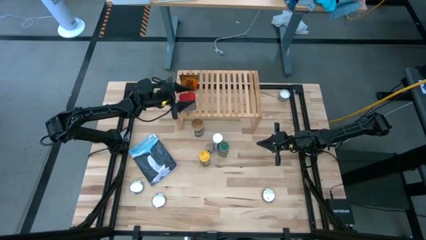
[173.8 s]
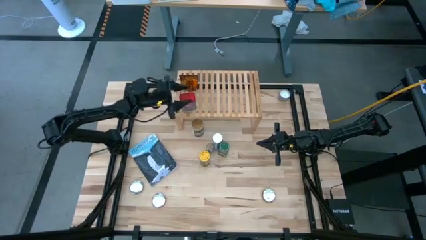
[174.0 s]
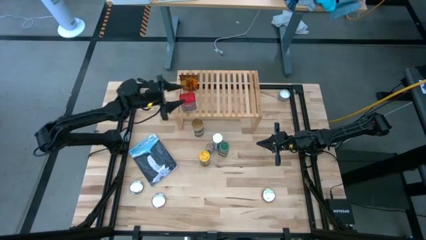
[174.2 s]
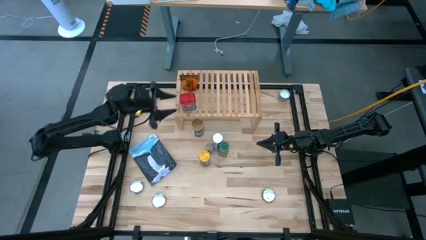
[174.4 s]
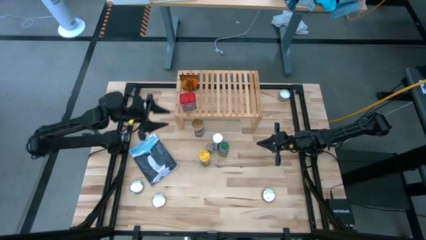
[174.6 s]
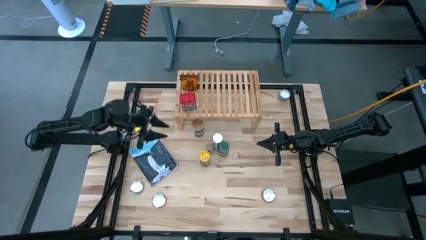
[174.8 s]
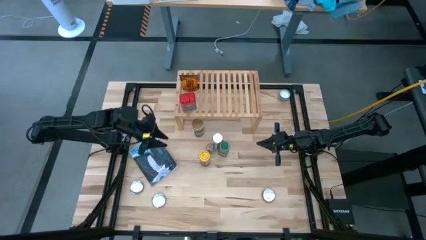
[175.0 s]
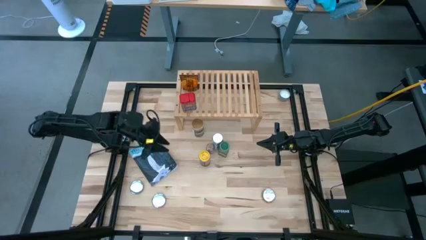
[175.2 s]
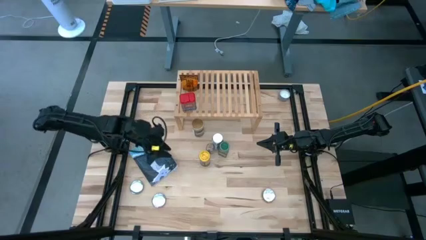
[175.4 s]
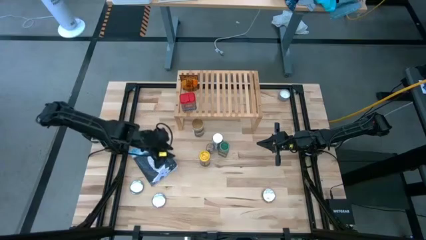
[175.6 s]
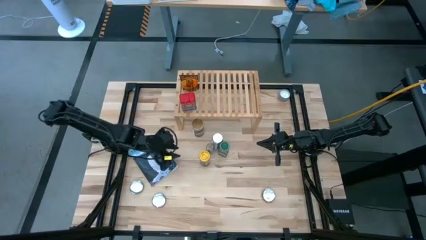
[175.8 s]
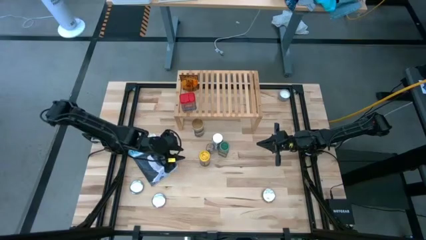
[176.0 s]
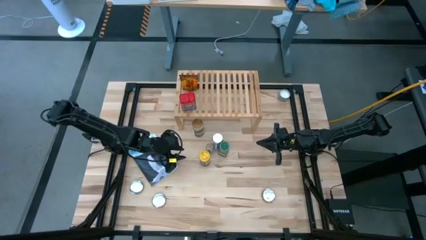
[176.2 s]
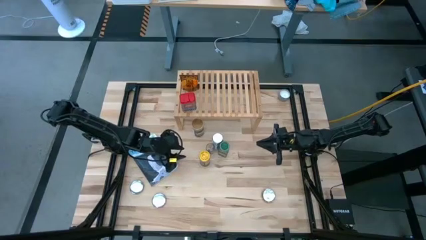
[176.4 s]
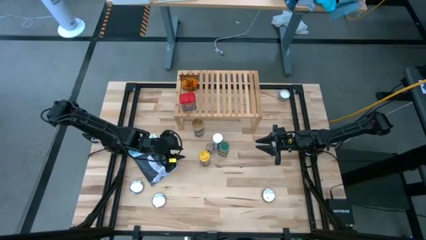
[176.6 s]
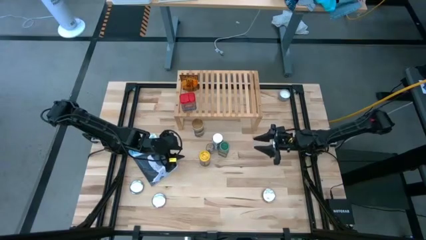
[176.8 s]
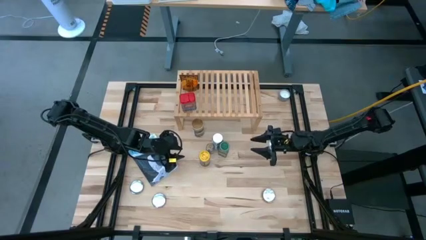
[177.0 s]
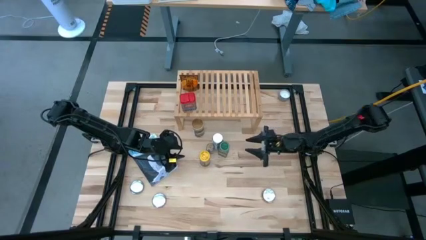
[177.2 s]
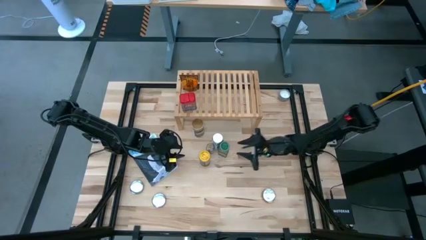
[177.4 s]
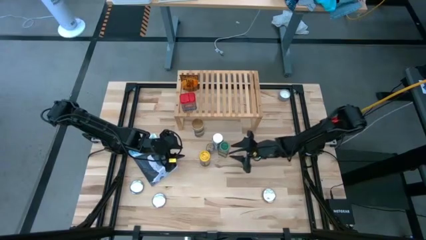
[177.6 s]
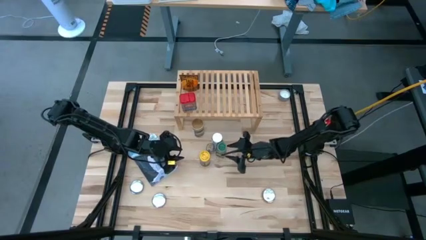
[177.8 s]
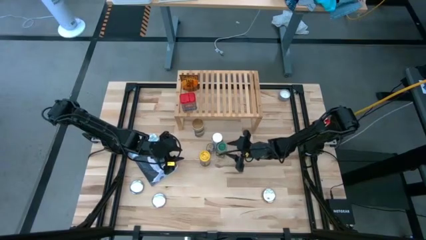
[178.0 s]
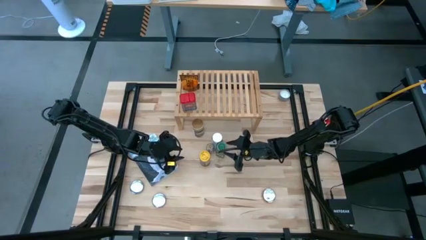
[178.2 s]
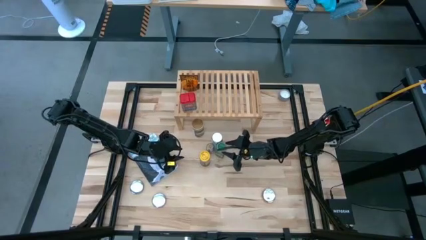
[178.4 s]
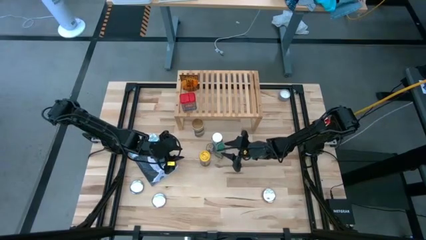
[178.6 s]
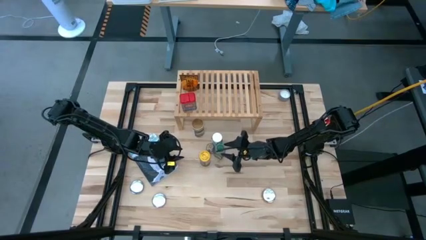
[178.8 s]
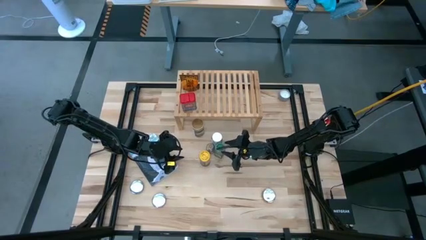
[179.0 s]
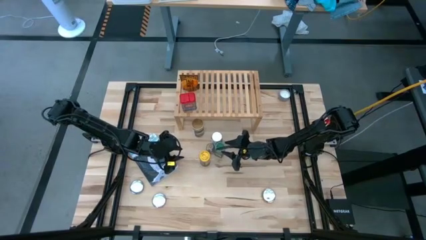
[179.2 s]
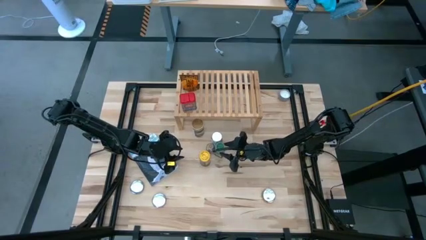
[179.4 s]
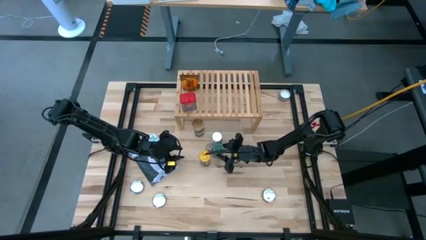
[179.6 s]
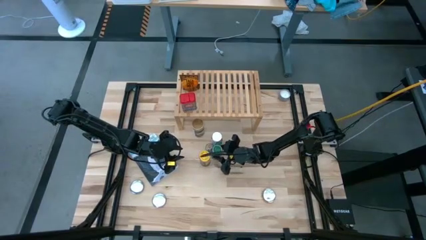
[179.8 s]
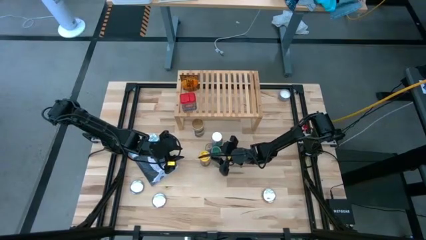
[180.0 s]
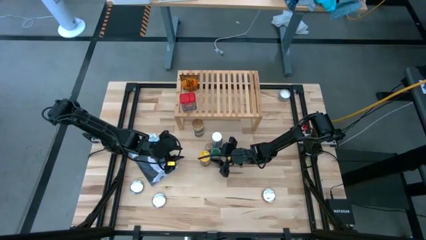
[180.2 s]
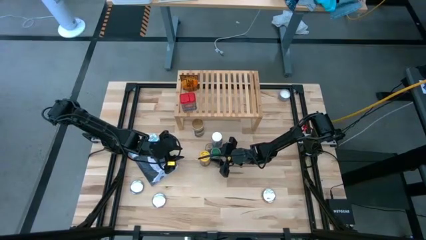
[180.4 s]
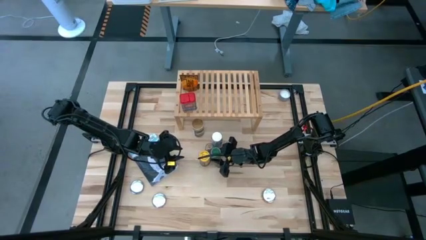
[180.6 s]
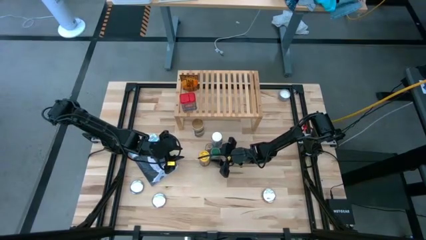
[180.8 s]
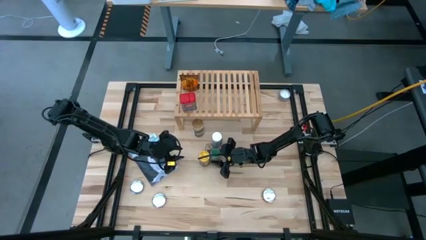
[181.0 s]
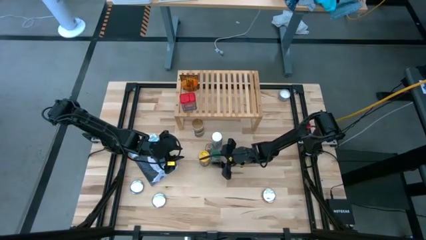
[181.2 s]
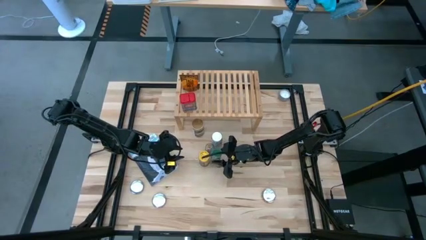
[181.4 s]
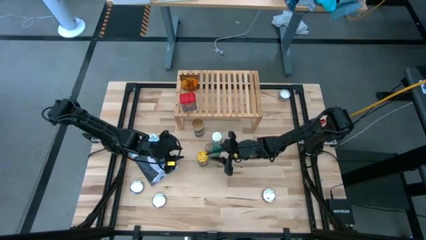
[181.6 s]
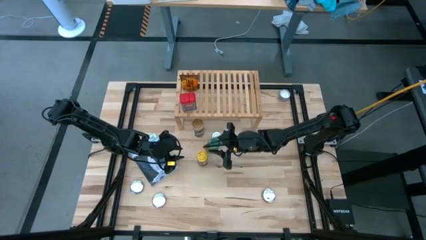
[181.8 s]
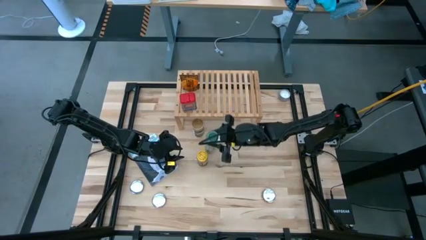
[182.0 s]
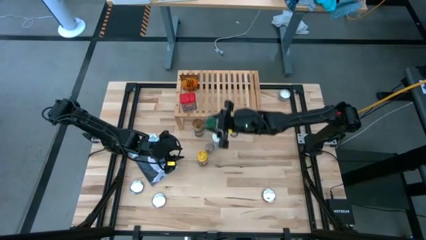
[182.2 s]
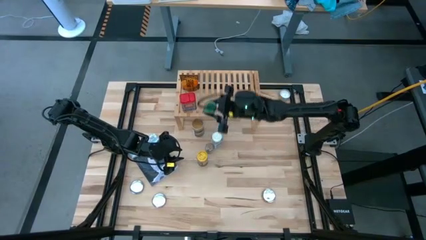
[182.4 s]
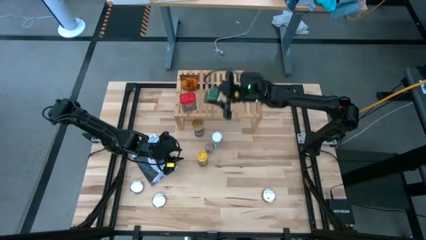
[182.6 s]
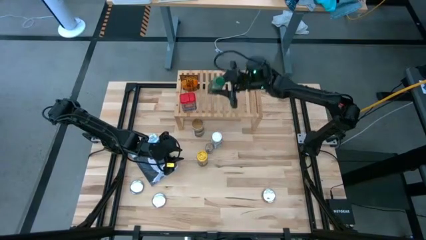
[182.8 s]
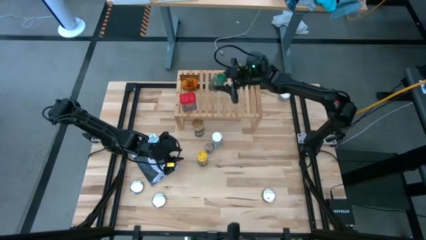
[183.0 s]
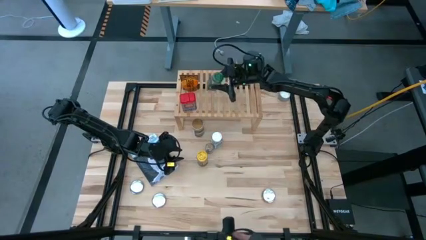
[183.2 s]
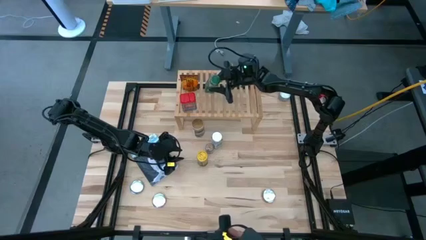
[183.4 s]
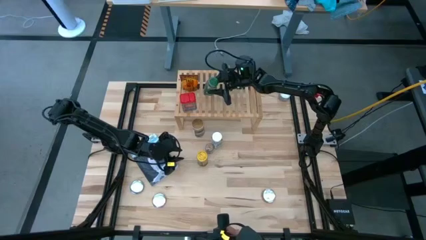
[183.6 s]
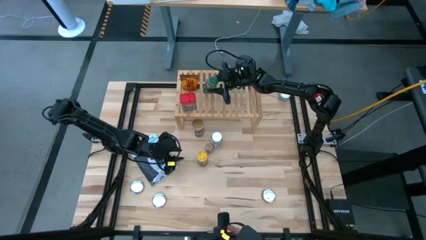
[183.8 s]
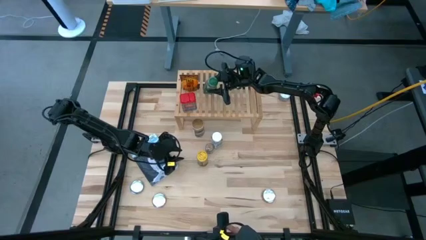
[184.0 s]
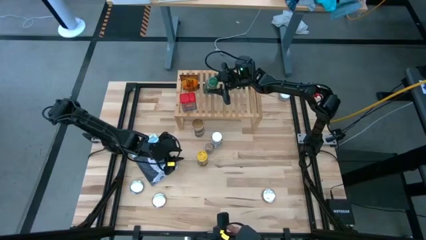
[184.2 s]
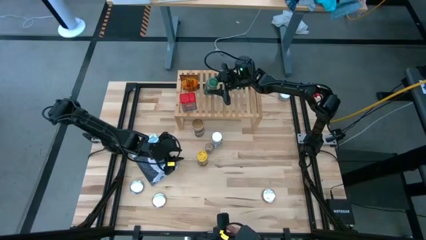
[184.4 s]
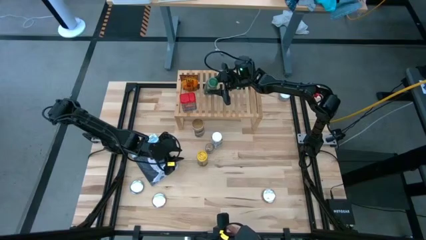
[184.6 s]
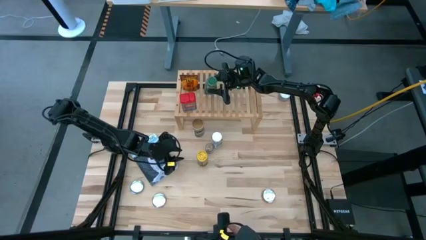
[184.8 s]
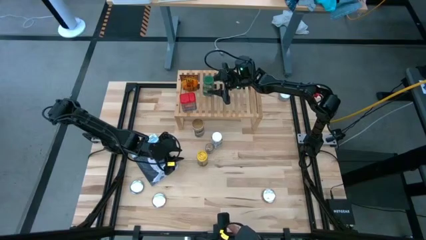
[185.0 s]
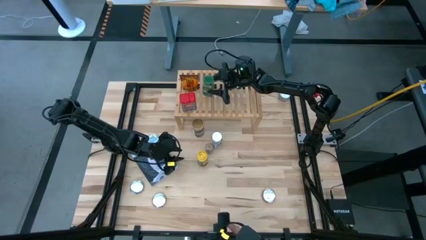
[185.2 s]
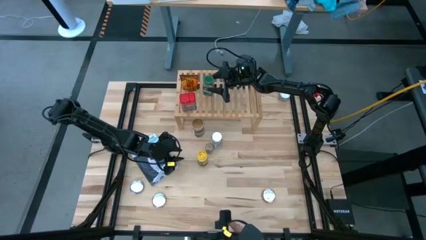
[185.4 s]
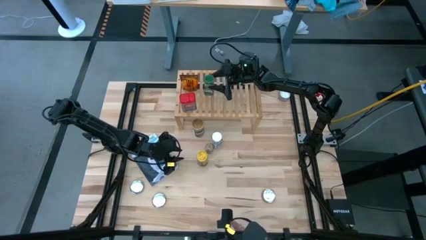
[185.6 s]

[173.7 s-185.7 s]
Task: Shelf spices
Put the green seasoning bottle on the shelf

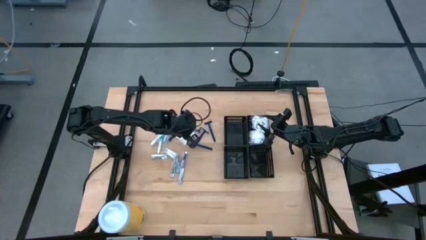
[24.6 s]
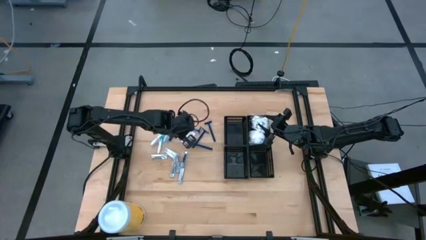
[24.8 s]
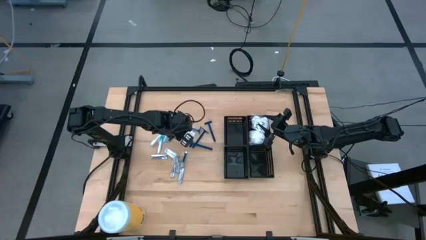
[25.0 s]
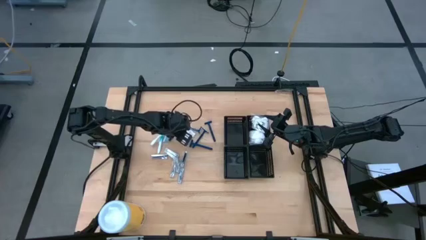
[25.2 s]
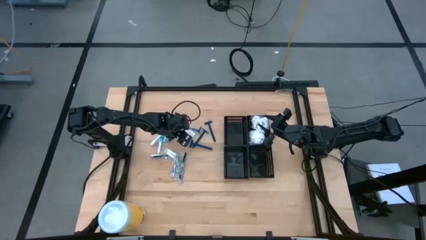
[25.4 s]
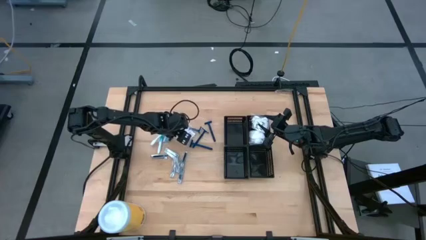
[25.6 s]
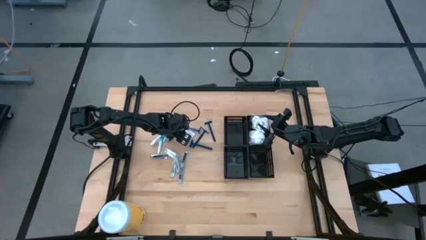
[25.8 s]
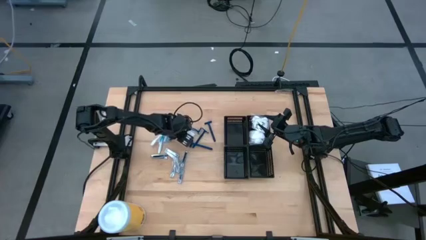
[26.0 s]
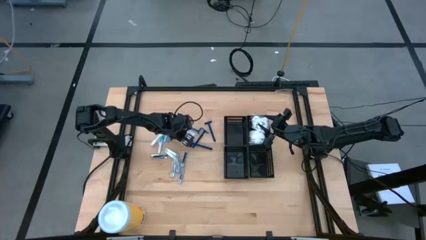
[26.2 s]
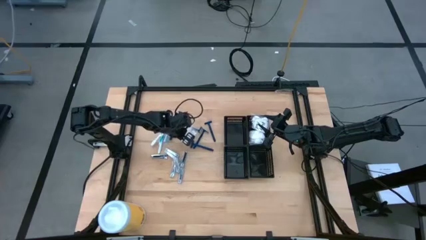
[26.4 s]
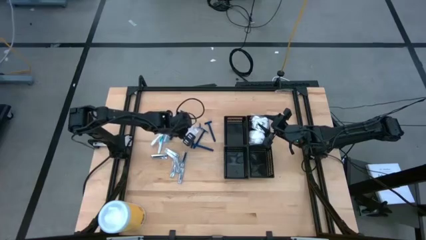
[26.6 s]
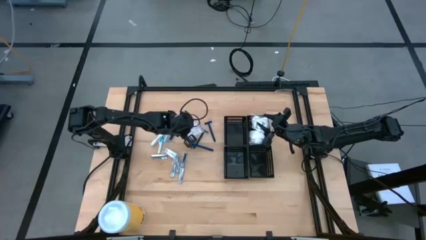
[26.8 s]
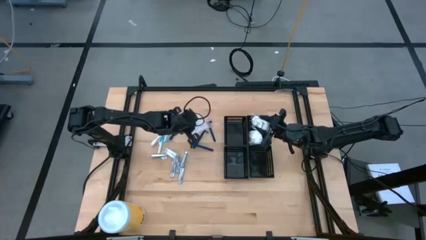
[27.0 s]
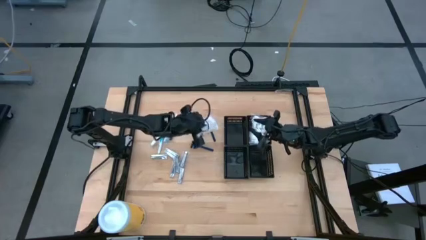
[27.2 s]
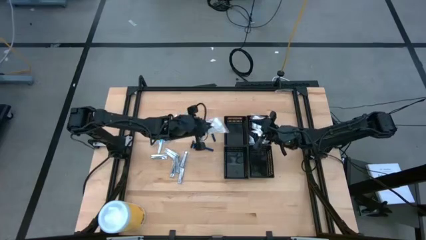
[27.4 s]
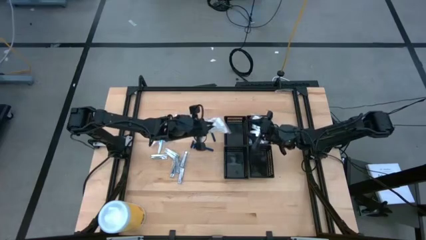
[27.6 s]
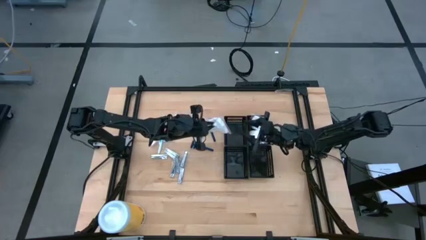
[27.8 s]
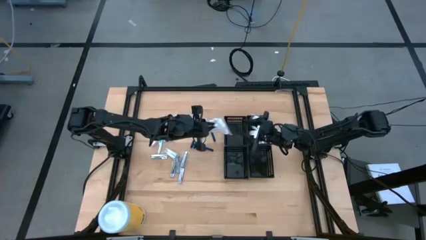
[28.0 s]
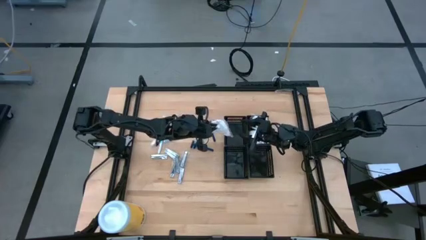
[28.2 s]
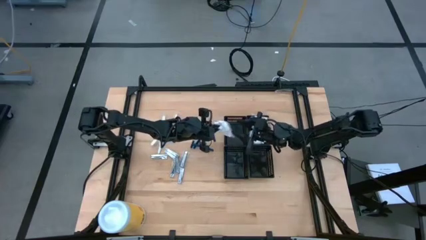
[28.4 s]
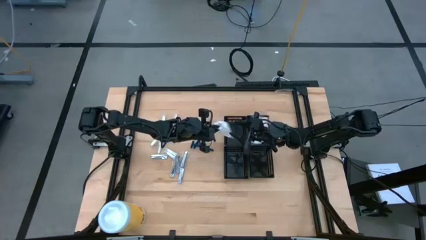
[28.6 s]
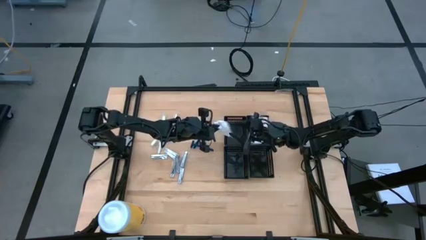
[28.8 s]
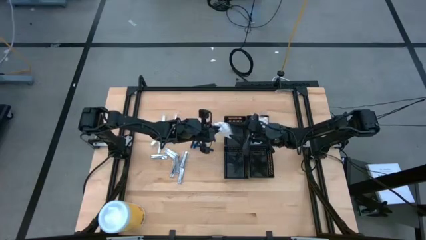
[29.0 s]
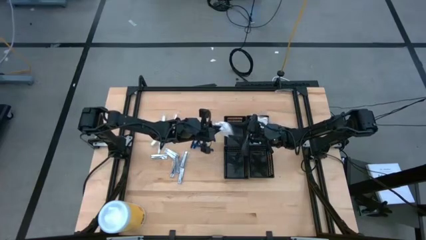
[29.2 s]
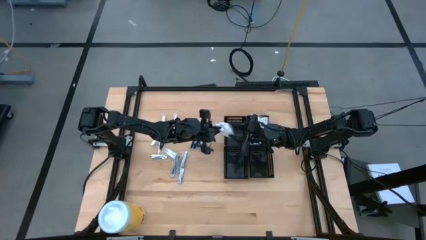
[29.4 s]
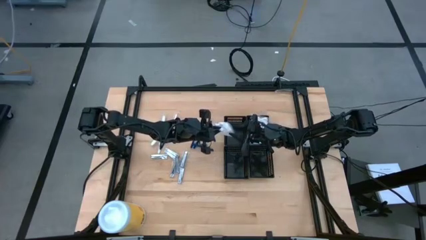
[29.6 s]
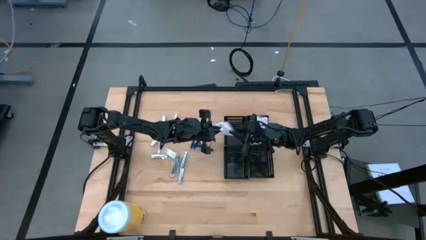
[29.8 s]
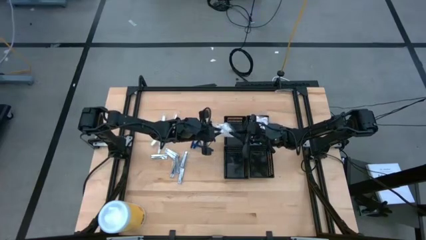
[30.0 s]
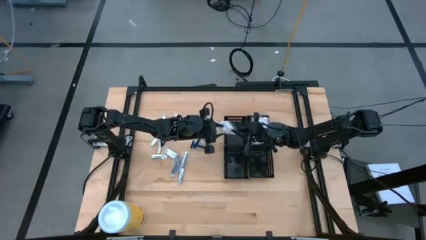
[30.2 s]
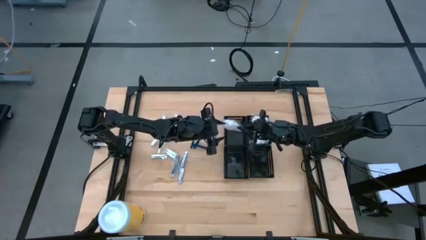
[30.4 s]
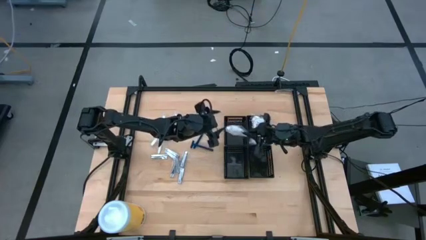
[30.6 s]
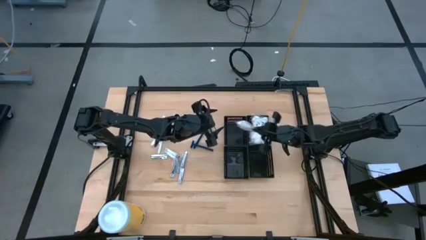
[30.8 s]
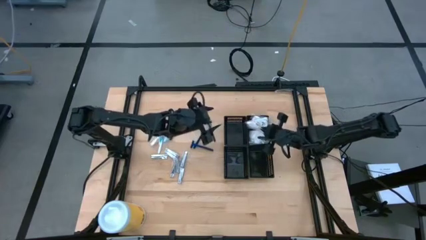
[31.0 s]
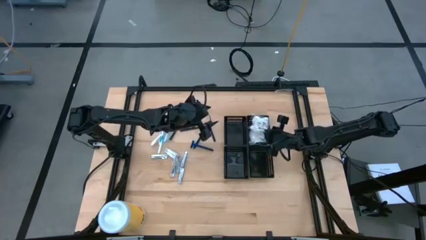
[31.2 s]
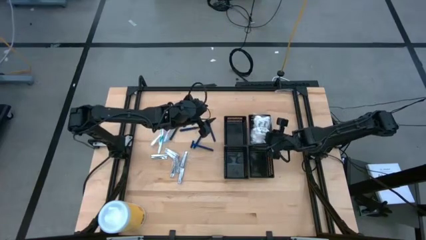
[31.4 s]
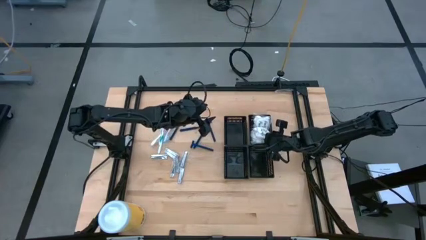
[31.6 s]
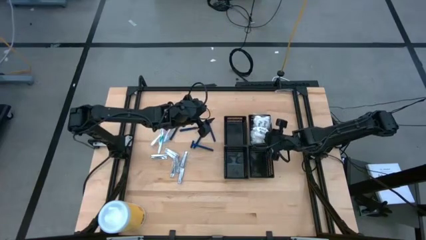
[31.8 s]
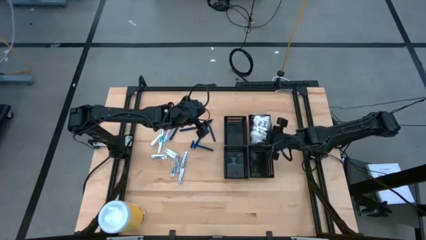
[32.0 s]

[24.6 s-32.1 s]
Task: Pick & Place Travel size toiletries
Put the cotton pack into the top right black basket
